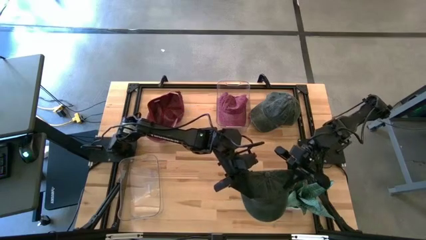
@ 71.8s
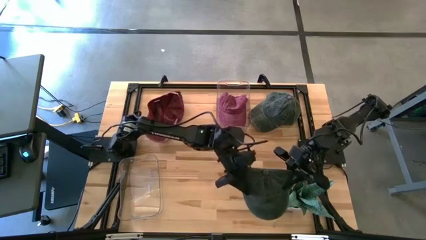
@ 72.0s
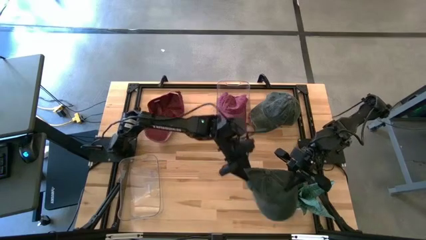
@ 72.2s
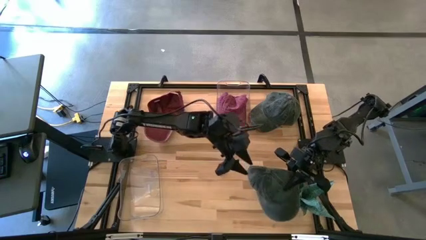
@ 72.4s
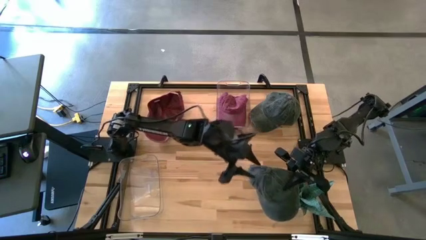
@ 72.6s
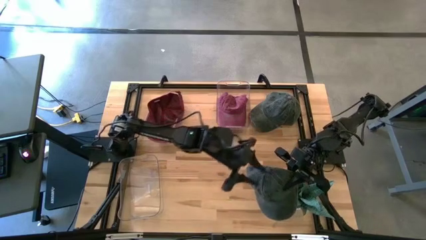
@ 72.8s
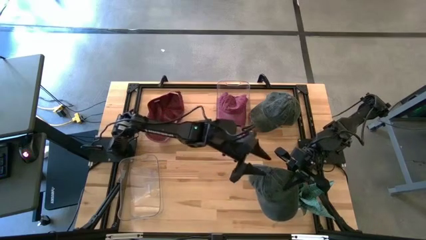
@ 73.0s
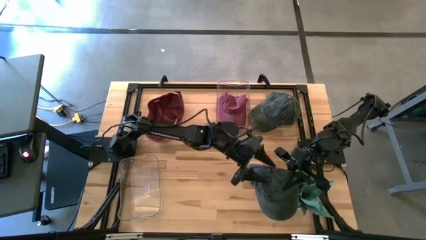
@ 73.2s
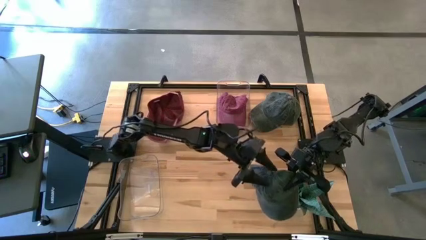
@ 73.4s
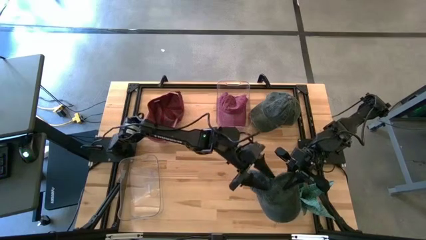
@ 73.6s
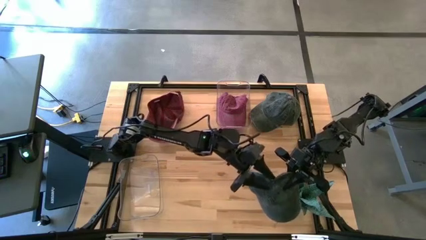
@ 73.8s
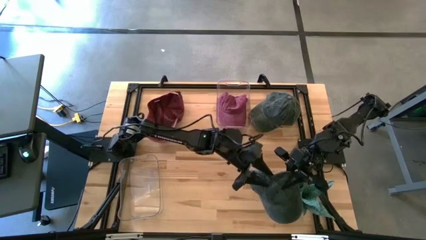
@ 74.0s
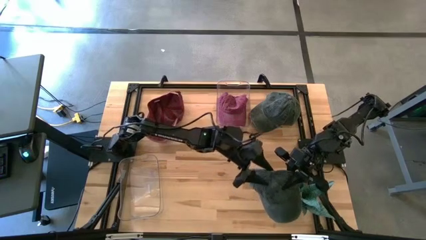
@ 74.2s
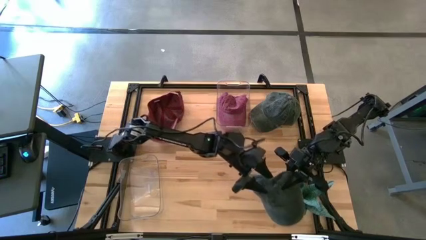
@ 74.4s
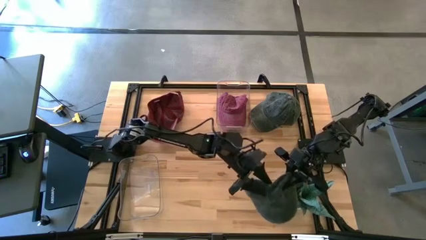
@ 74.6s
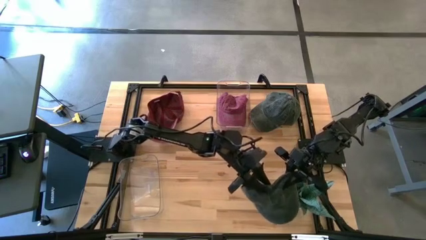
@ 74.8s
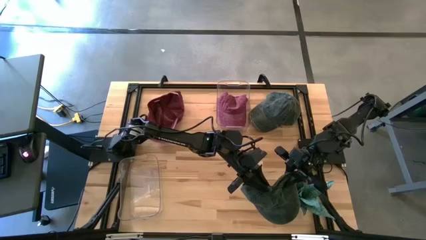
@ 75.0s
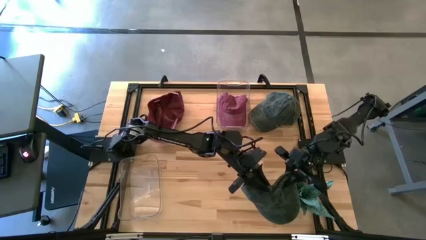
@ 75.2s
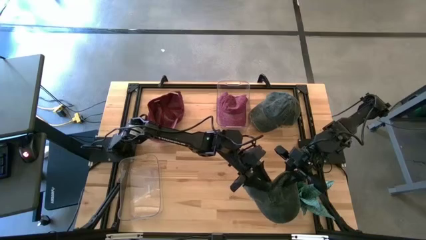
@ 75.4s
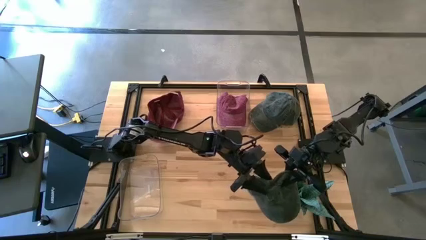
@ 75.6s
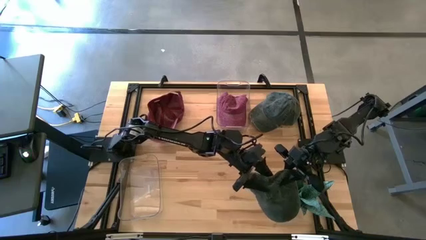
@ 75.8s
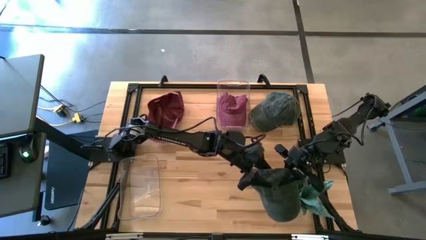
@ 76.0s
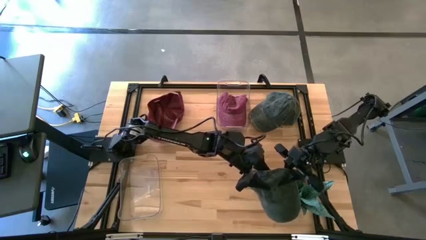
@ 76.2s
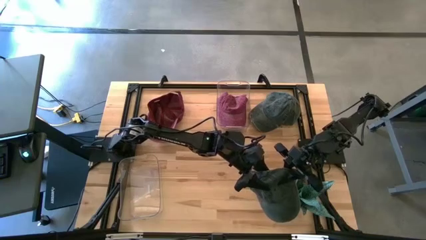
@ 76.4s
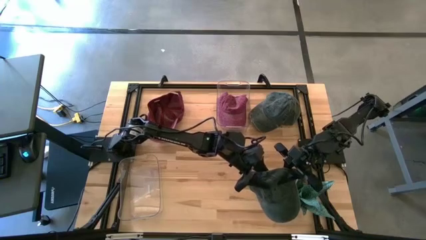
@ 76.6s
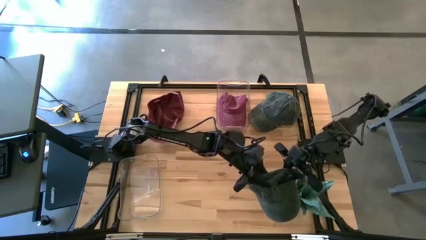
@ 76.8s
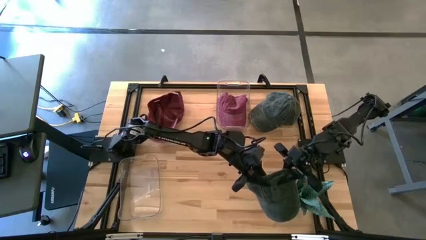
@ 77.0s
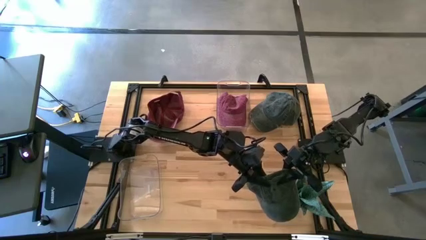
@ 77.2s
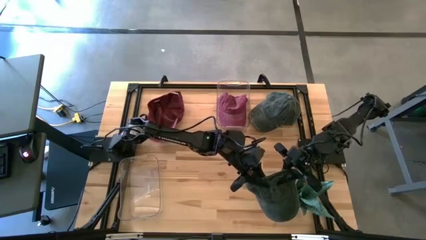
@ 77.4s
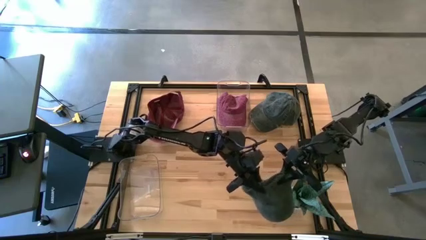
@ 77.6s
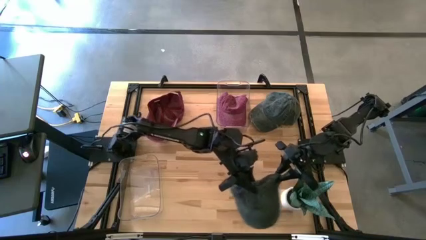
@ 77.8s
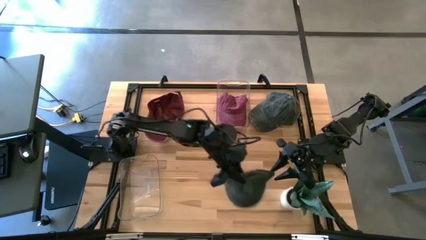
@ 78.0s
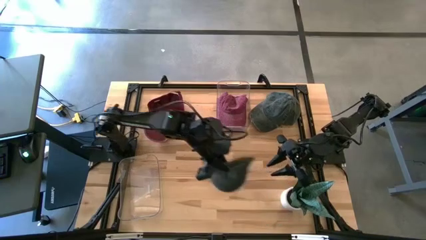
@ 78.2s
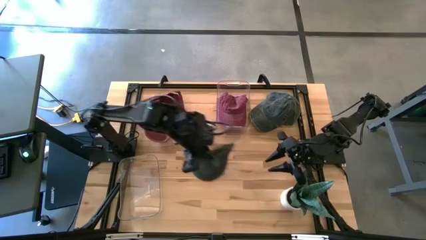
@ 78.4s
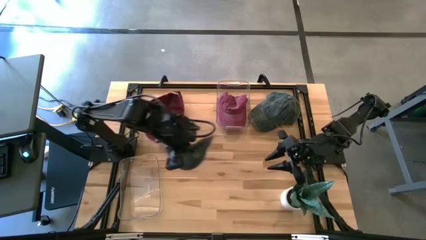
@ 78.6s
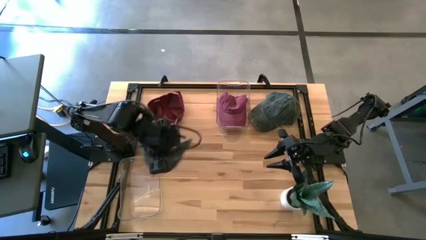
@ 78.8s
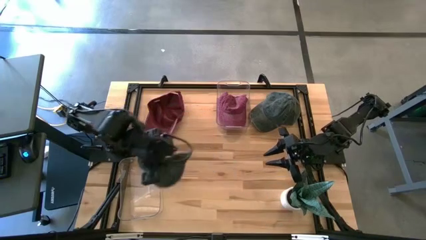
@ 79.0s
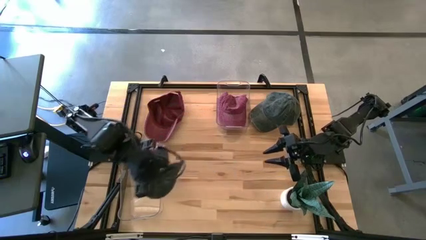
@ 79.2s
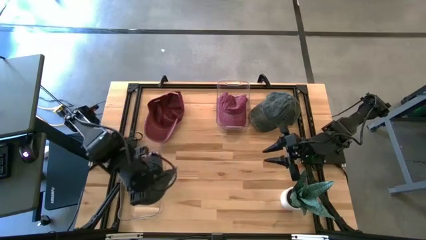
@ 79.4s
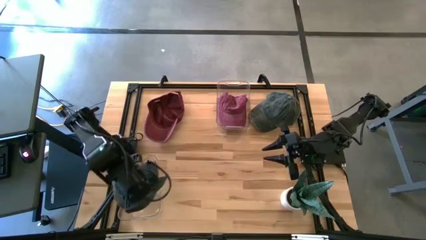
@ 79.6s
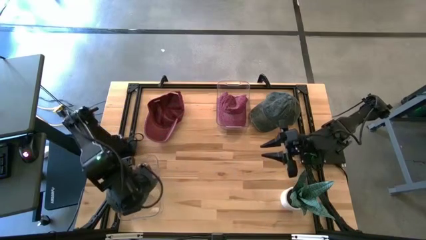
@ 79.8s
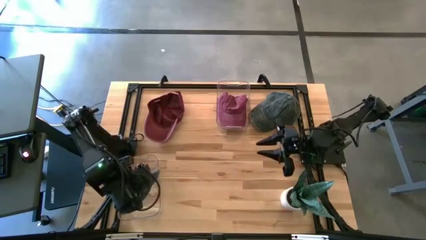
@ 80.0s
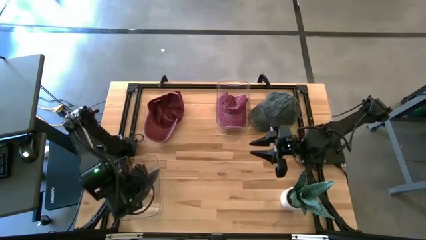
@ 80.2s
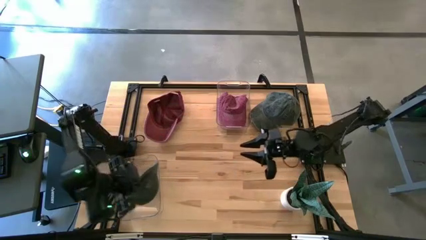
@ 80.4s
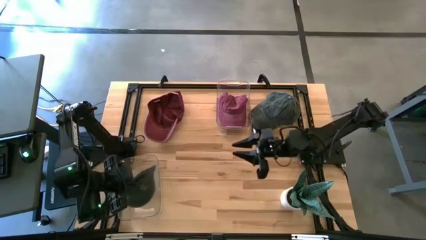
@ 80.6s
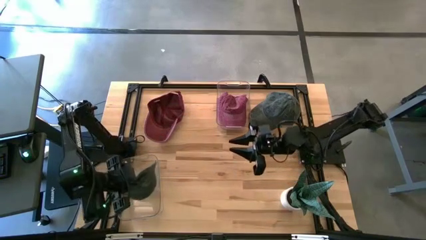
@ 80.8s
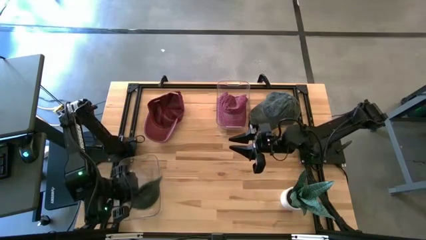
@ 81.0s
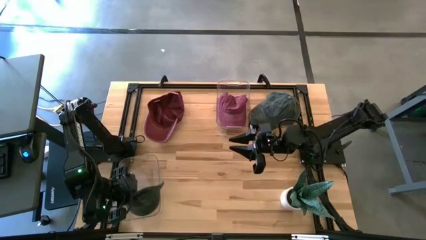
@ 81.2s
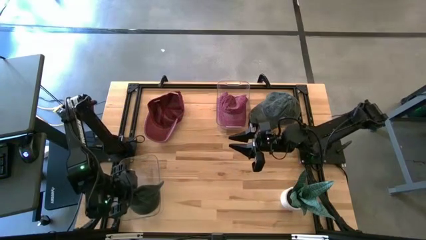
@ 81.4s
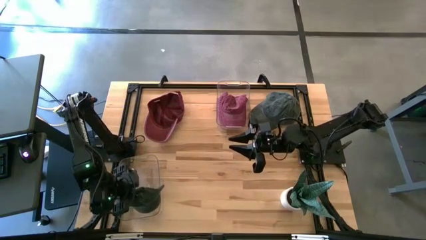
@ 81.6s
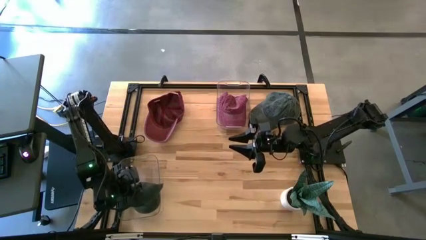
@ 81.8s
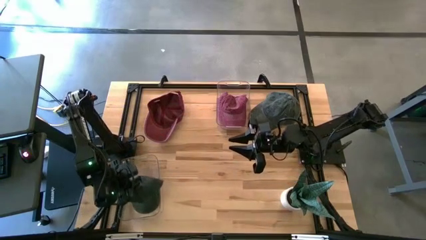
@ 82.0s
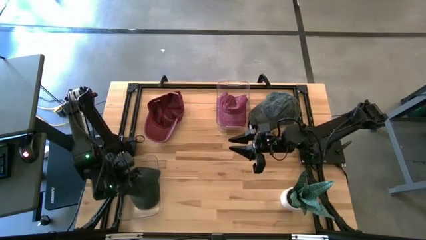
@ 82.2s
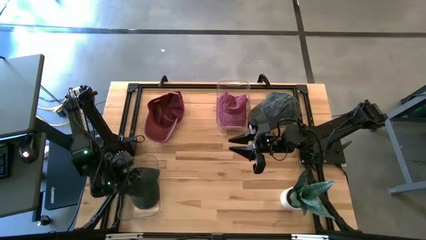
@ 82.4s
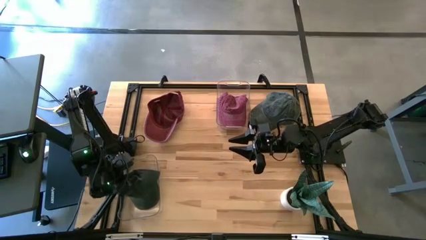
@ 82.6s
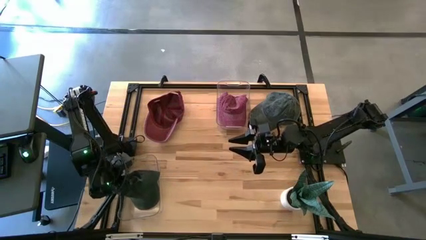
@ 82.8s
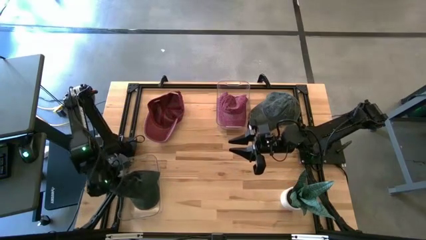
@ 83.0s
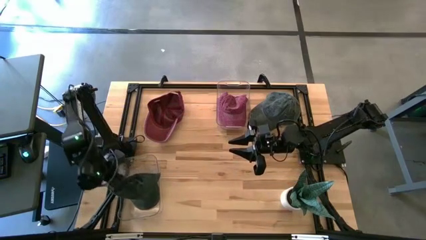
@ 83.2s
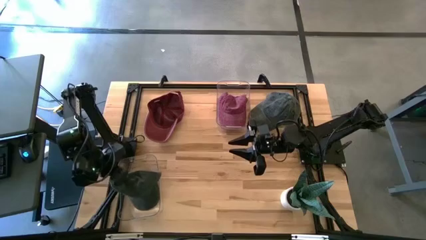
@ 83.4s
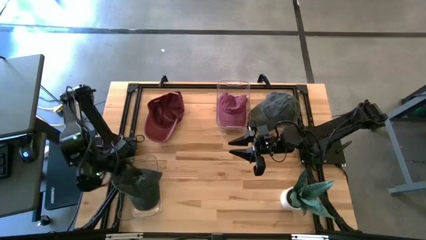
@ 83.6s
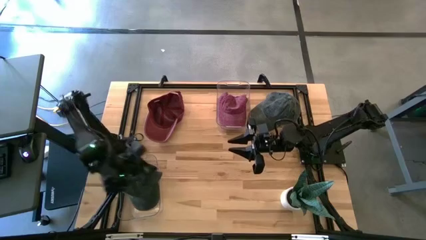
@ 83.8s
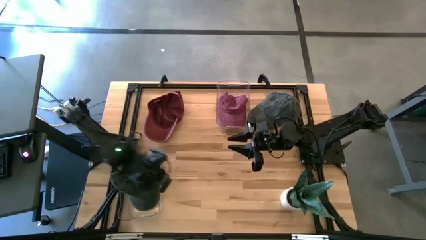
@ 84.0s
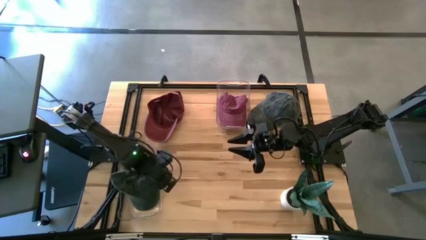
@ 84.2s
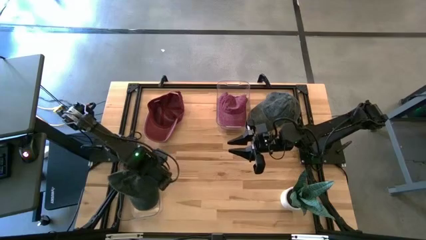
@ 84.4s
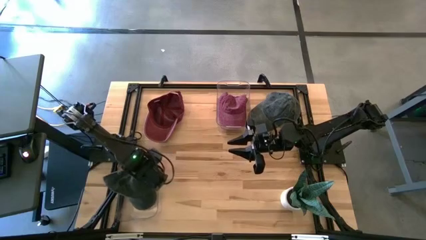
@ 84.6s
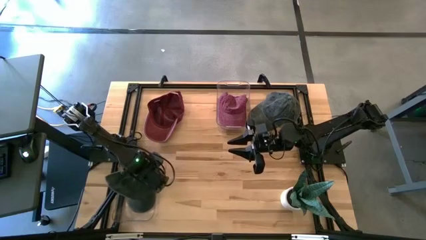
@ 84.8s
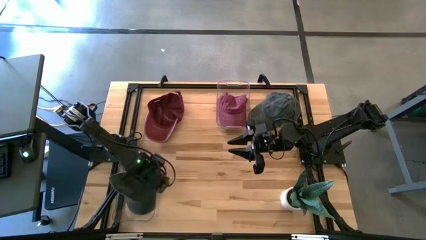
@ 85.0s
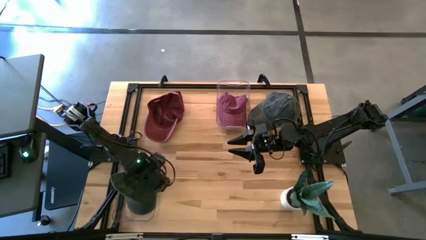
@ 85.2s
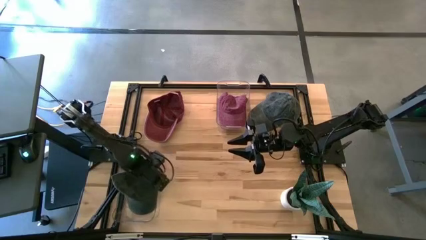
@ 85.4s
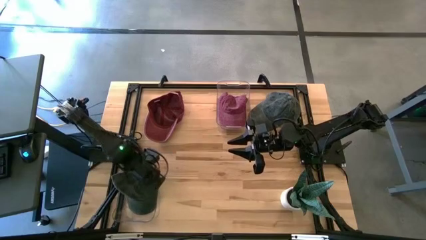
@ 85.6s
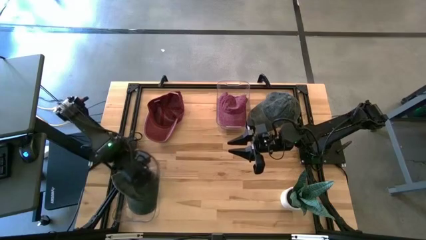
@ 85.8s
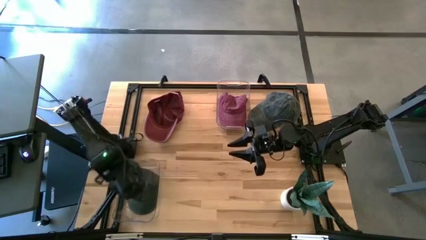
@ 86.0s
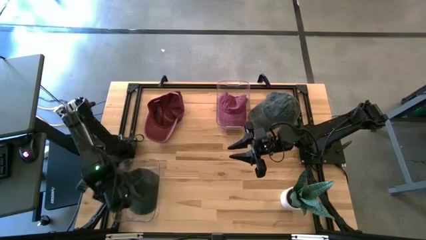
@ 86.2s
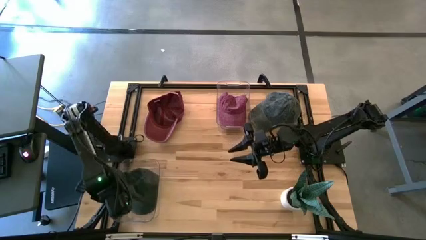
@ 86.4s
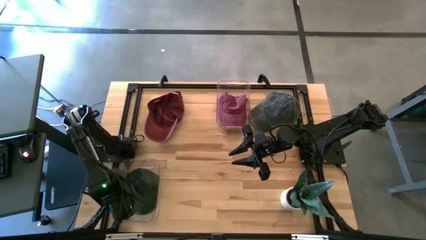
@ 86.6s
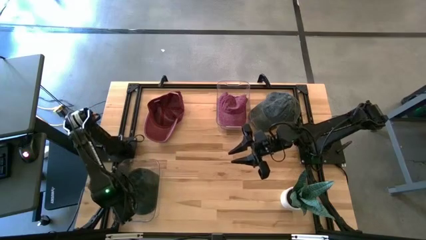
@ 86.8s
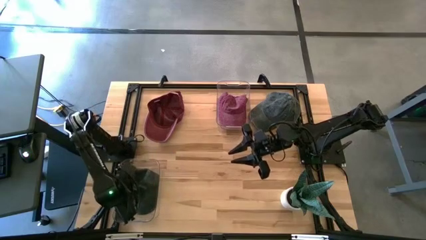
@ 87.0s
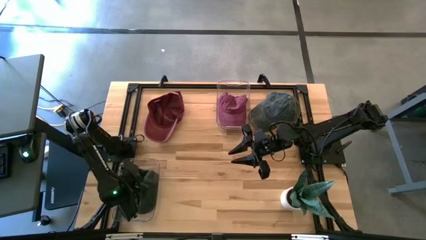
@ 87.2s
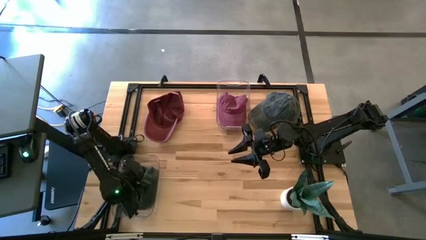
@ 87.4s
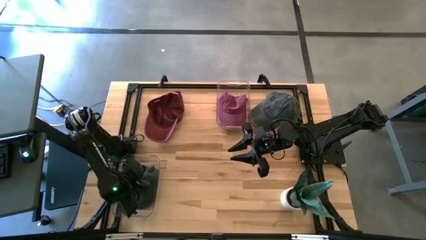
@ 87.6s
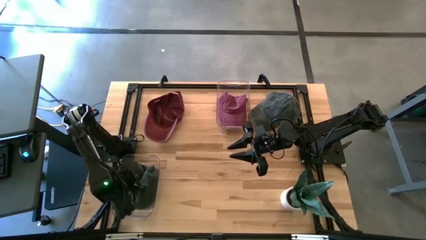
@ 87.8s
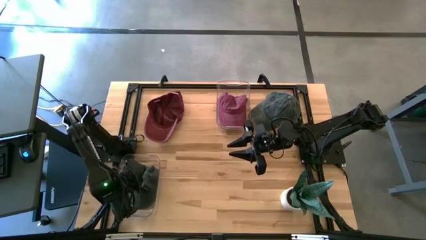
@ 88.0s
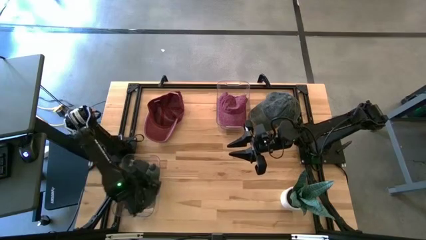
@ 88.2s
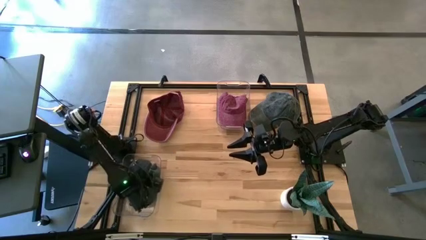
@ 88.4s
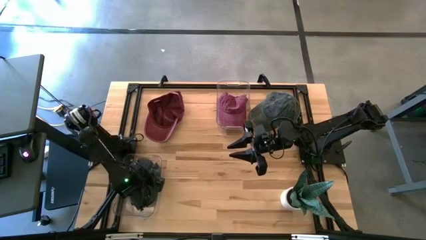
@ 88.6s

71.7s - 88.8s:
Task: Pick & Place hat
Put the left black cap into the bottom transparent bin
